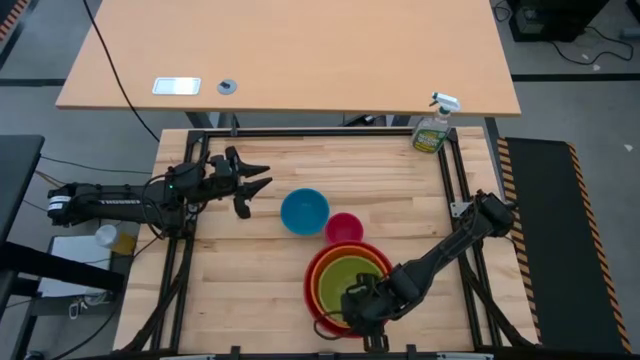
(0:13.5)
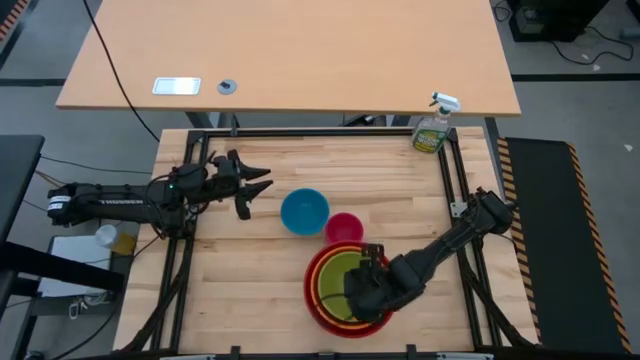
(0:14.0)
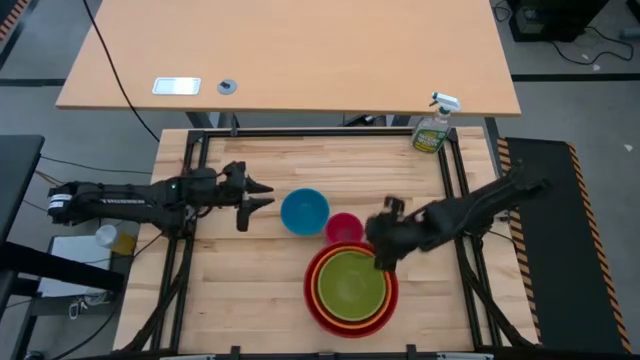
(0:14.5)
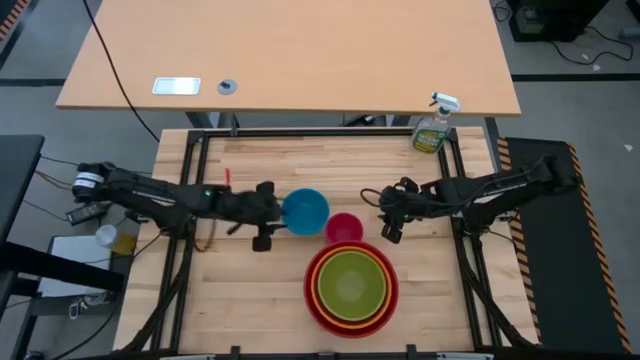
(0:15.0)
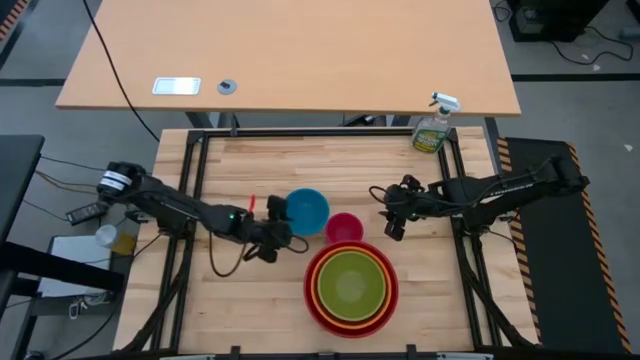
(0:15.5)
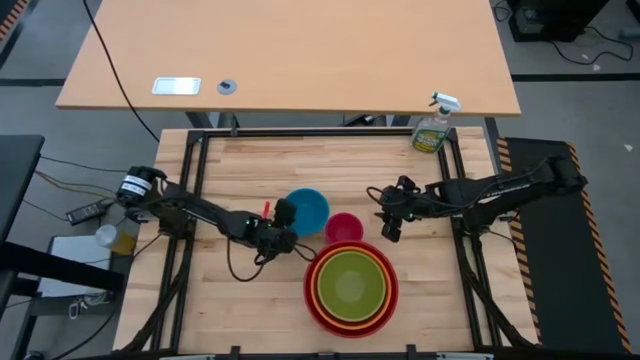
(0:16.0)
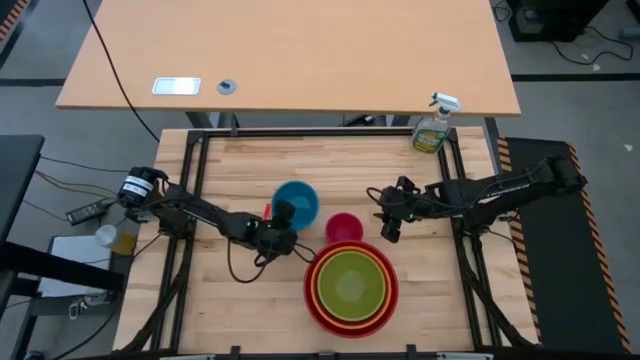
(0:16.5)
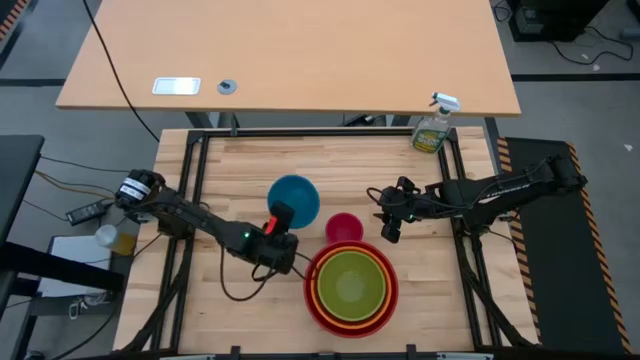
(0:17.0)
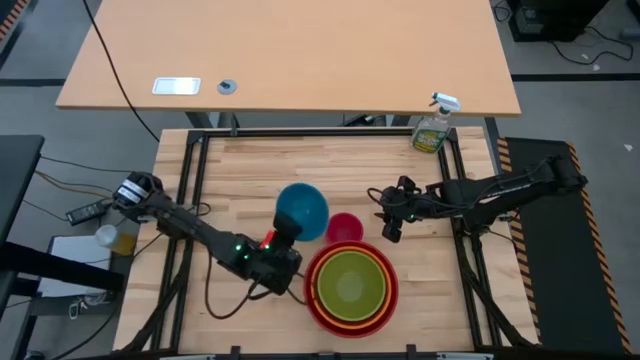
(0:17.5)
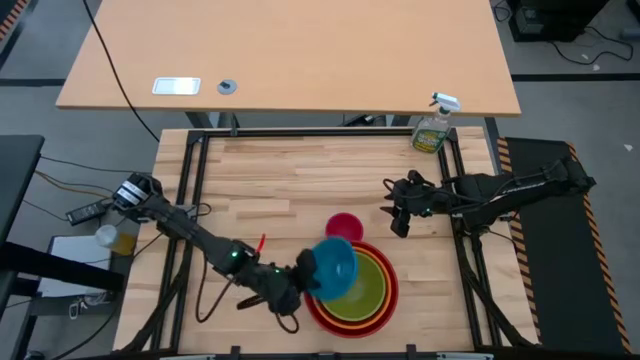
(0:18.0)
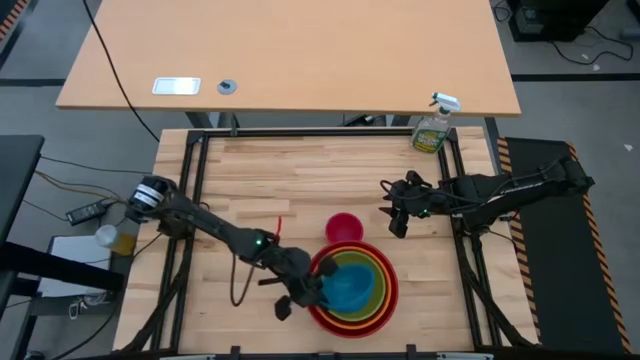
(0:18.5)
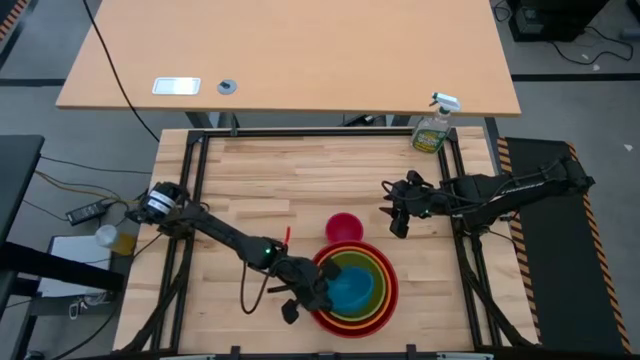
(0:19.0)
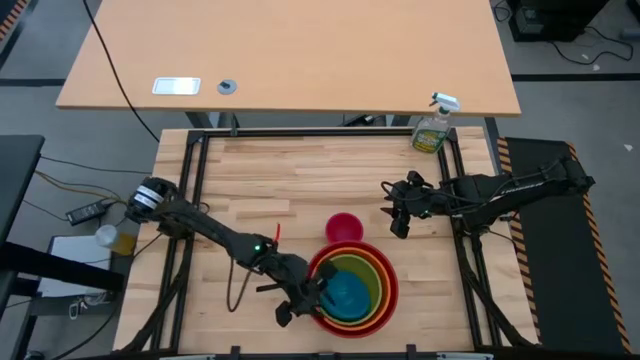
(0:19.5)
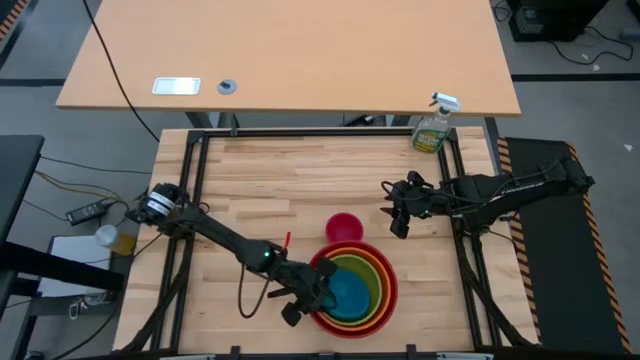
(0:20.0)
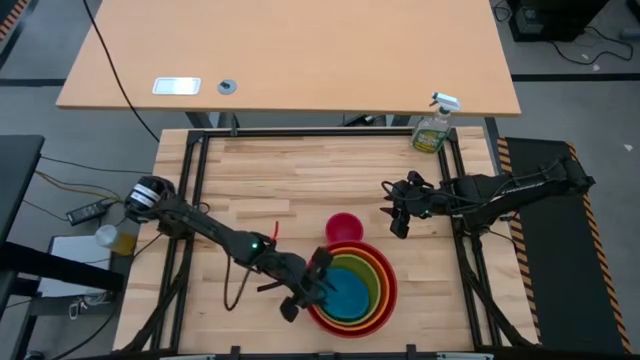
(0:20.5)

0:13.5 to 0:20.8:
Stack the blue bowl on top of the green bowl

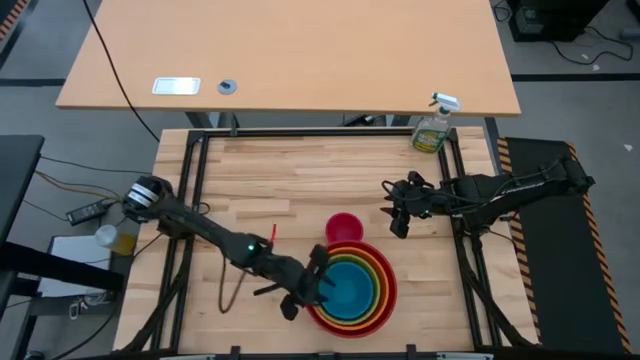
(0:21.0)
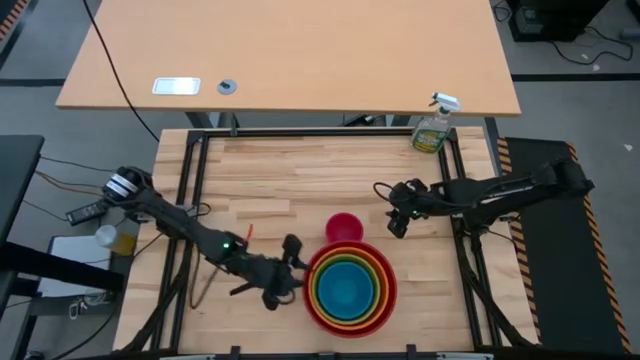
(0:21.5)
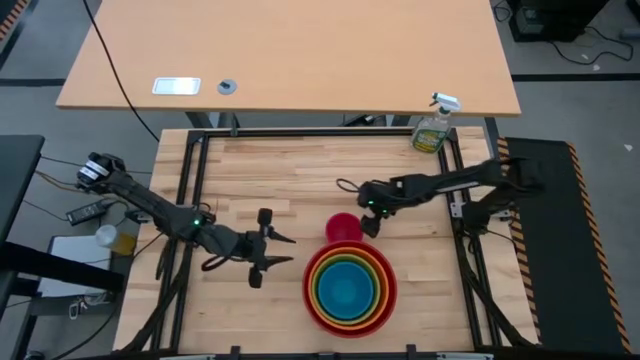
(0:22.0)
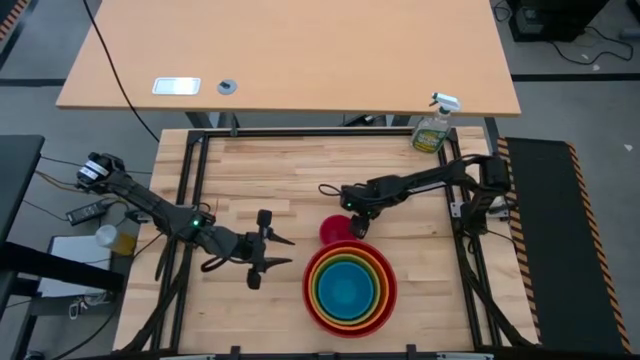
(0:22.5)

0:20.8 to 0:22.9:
Stack the pink bowl on top of the blue bowl

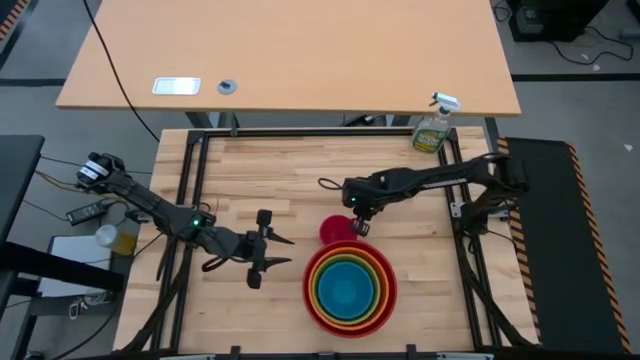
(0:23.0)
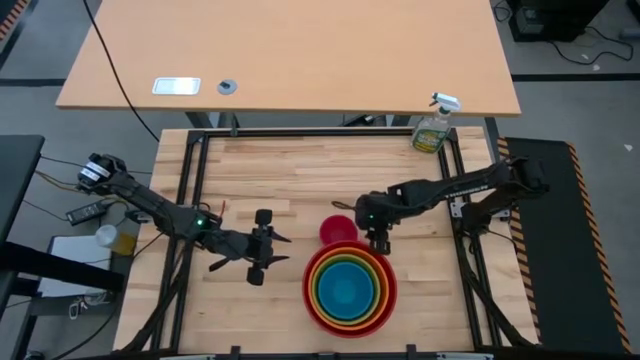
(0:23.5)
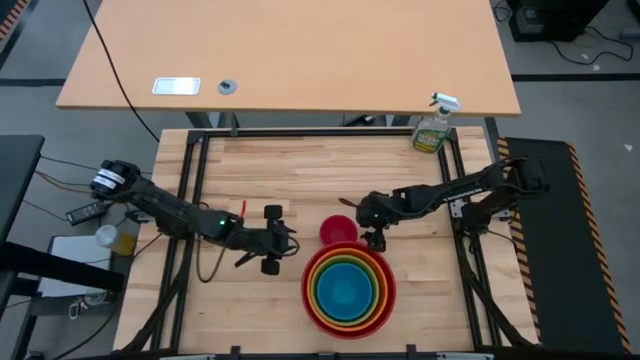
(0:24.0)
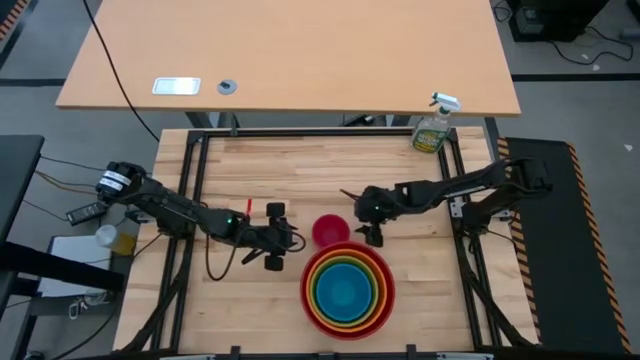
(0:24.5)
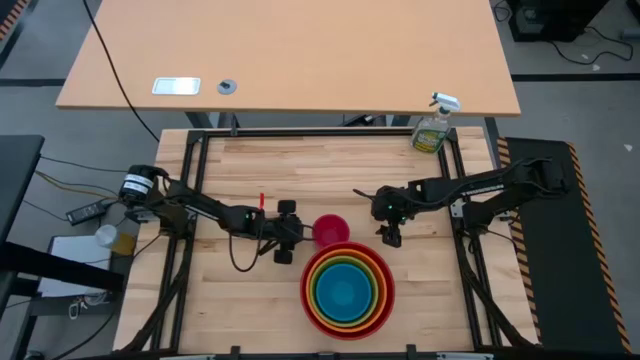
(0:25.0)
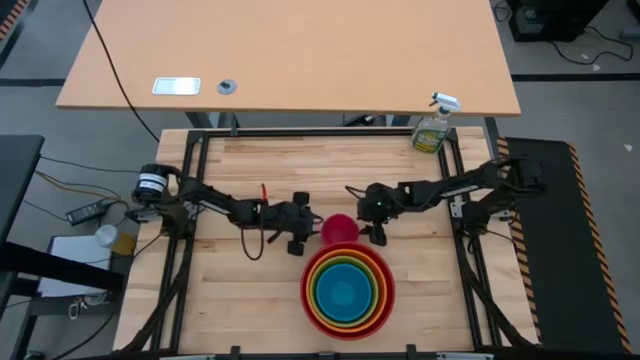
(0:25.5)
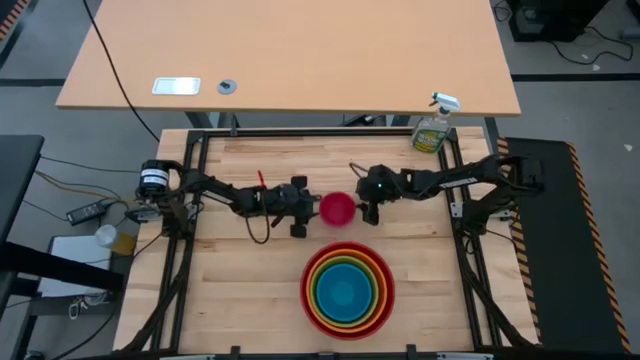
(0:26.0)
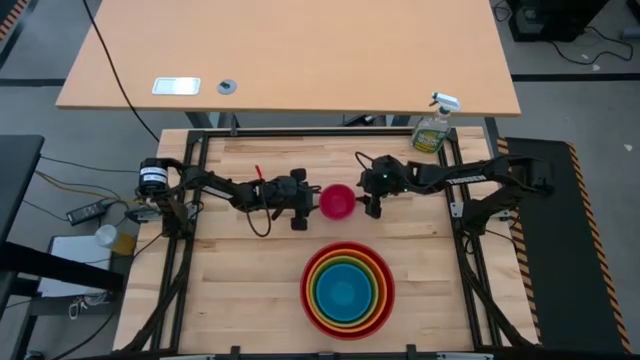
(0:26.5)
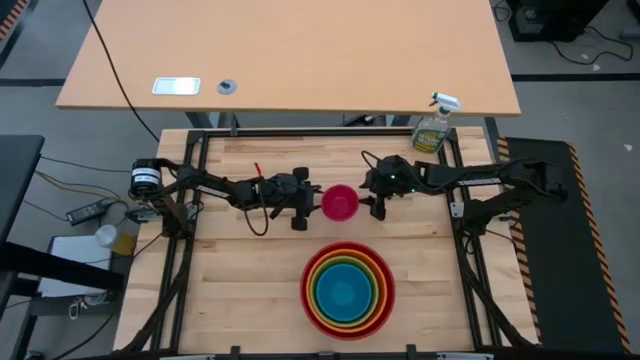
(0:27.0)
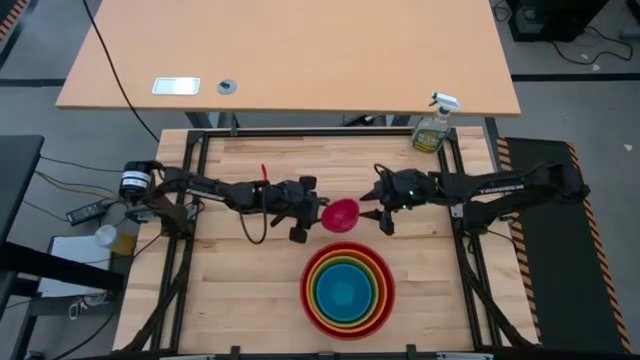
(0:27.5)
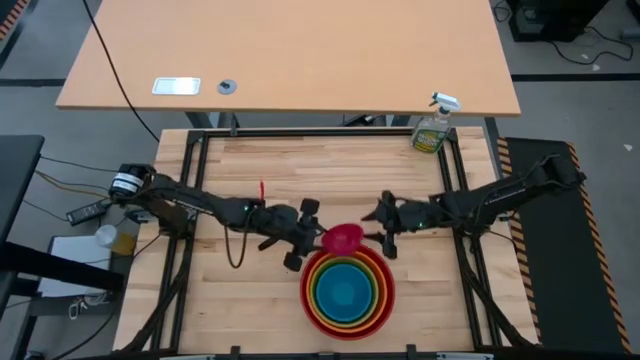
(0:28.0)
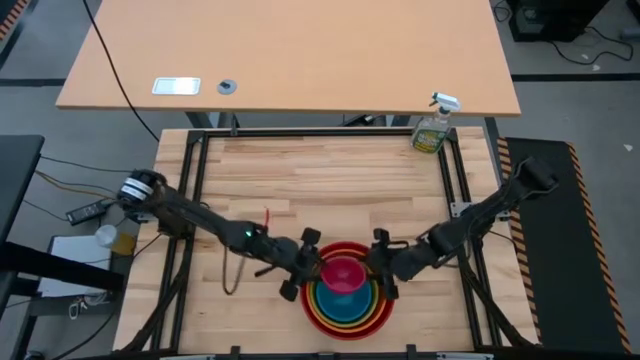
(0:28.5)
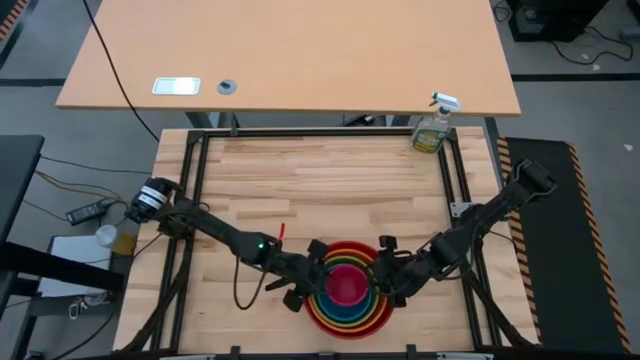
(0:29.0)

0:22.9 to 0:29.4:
Stack the pink bowl on top of the blue bowl

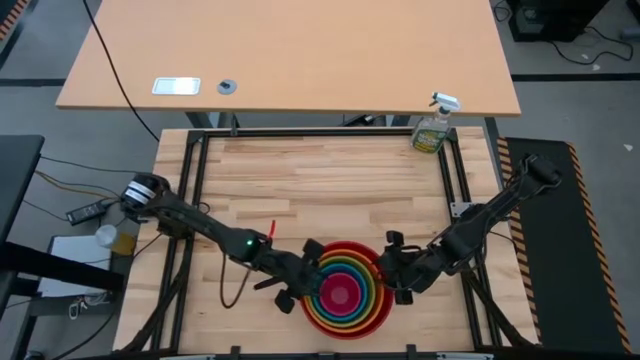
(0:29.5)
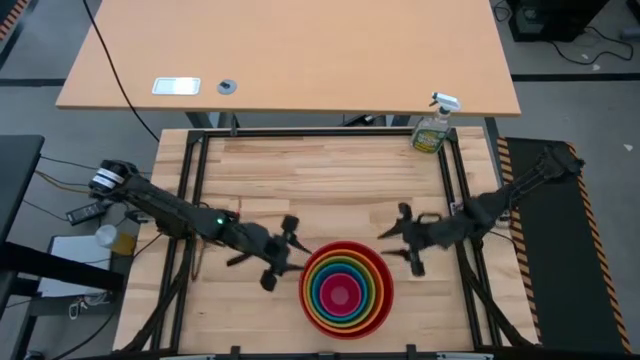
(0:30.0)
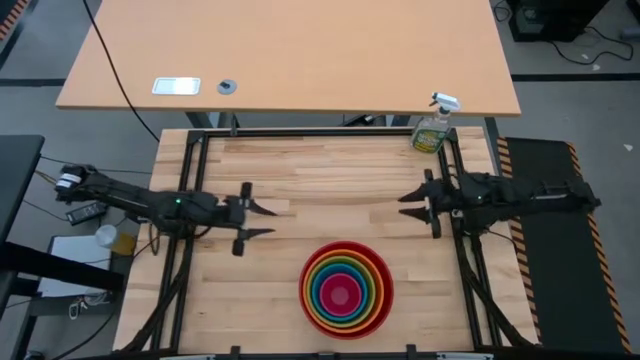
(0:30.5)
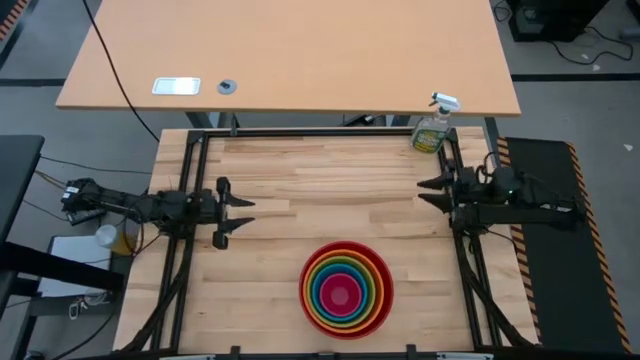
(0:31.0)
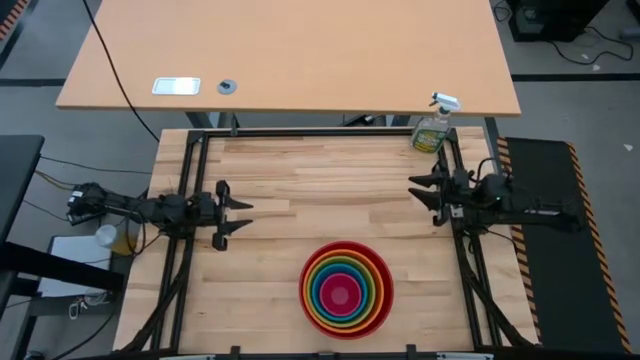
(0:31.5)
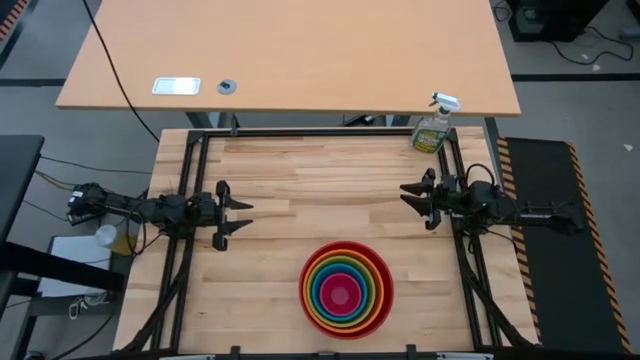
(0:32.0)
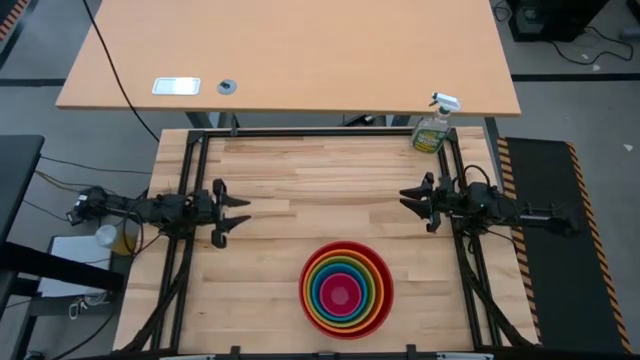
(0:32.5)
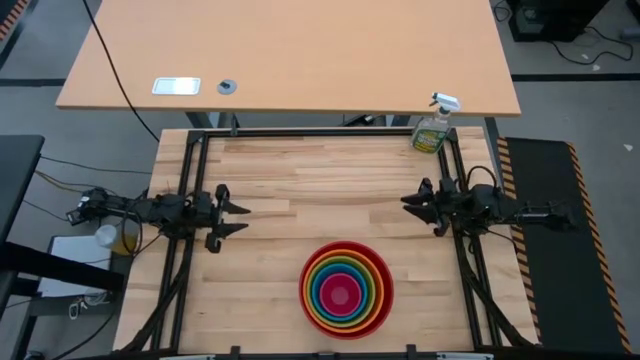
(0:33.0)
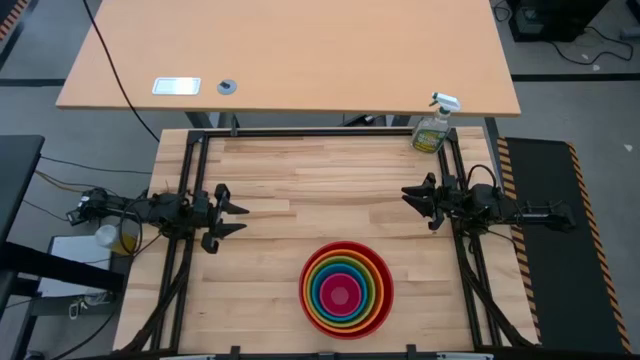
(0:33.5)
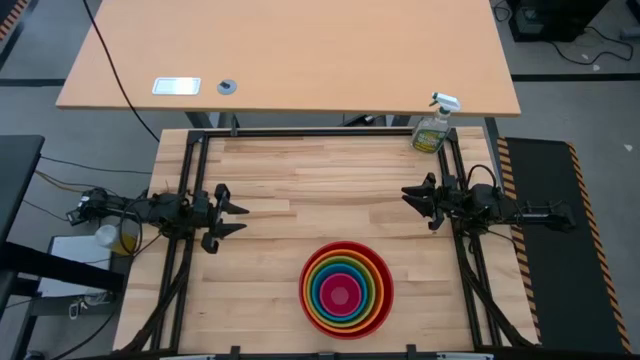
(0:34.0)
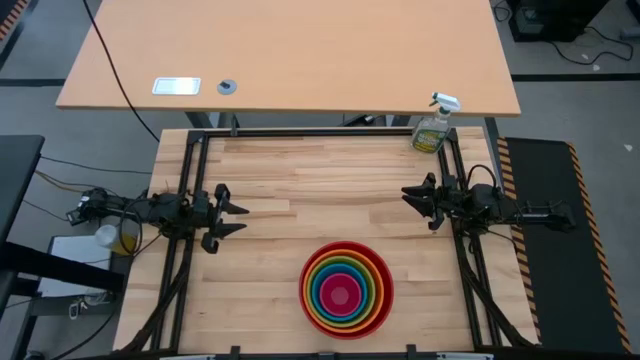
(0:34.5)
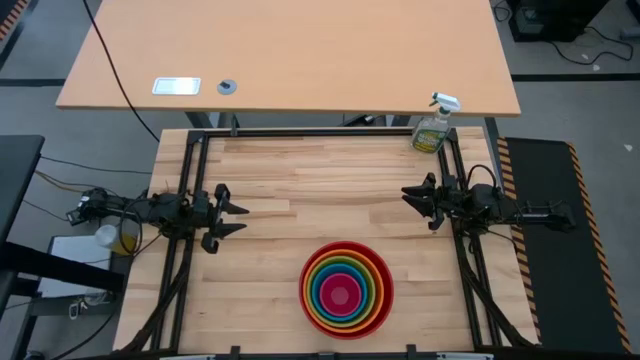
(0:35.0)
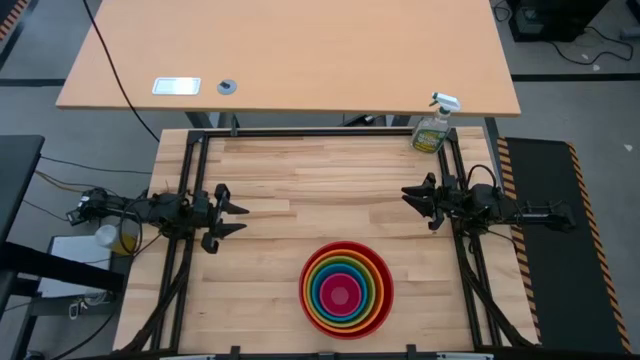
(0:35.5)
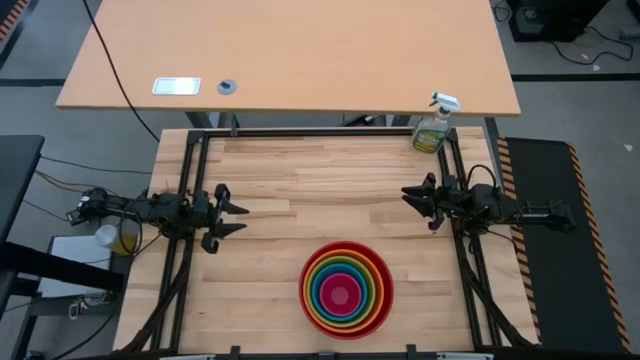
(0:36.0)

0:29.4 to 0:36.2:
Return to Home Position
